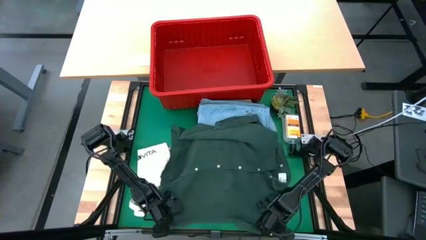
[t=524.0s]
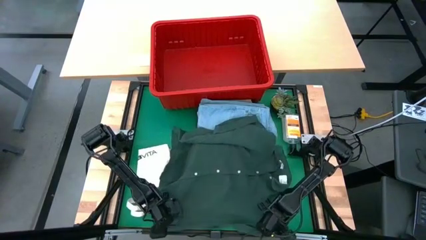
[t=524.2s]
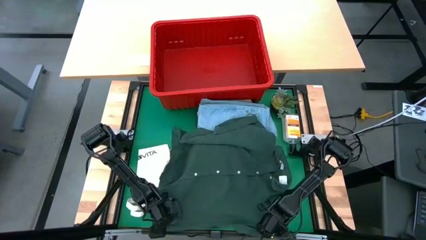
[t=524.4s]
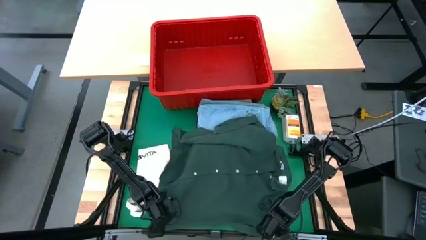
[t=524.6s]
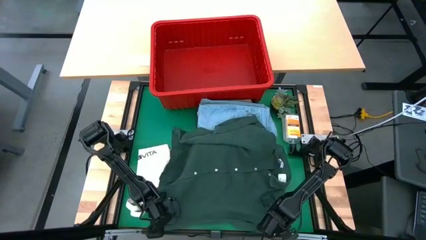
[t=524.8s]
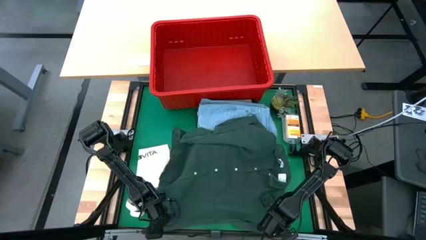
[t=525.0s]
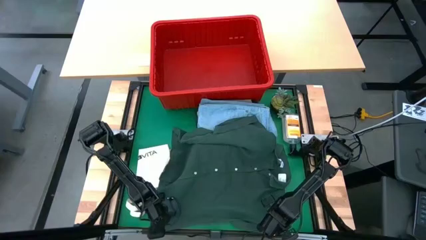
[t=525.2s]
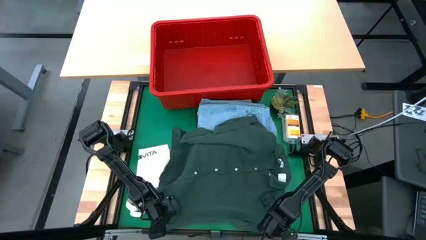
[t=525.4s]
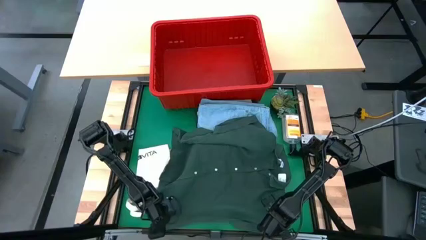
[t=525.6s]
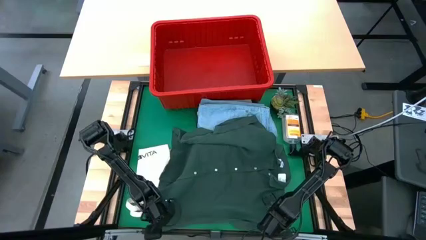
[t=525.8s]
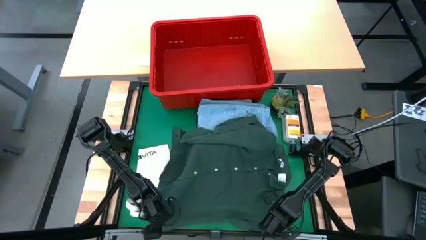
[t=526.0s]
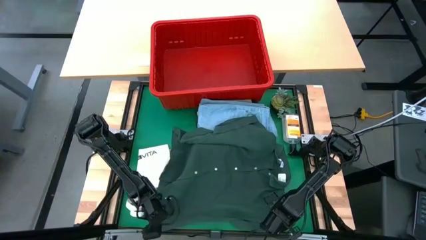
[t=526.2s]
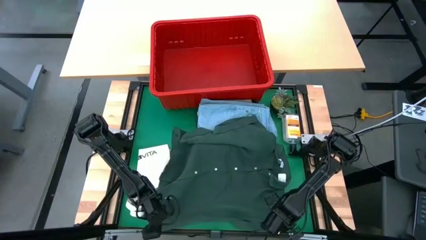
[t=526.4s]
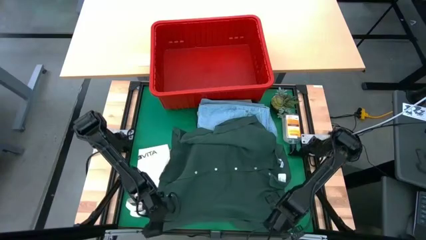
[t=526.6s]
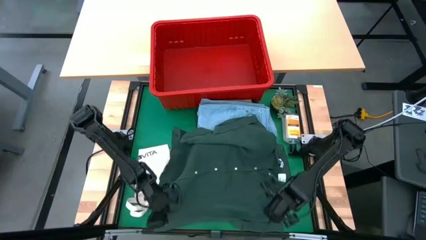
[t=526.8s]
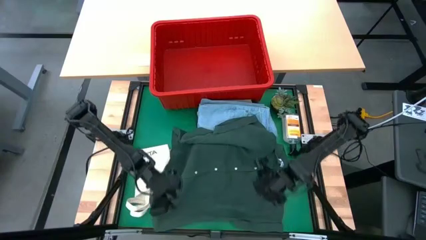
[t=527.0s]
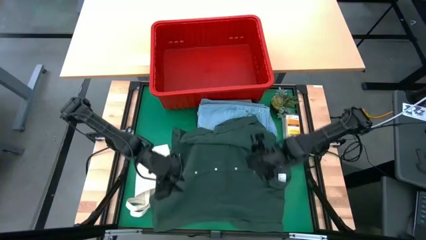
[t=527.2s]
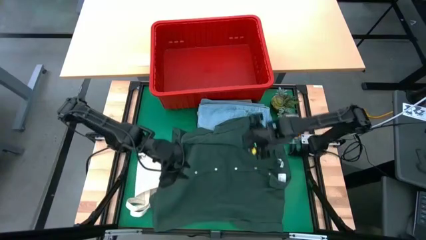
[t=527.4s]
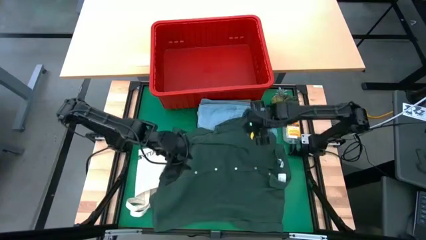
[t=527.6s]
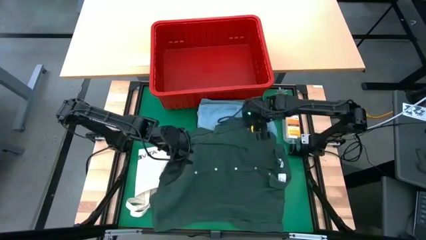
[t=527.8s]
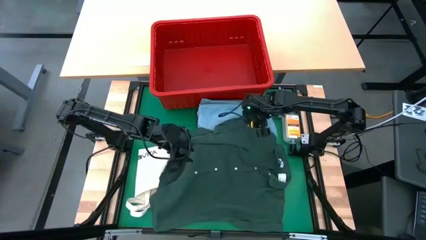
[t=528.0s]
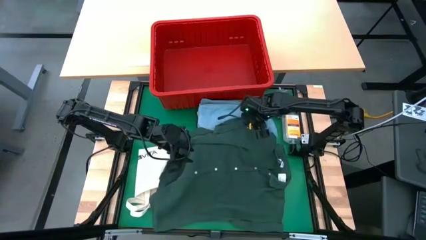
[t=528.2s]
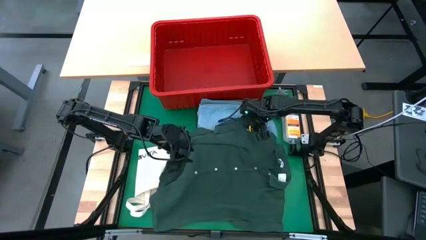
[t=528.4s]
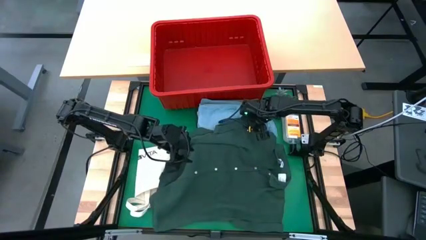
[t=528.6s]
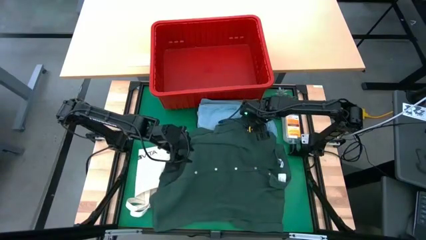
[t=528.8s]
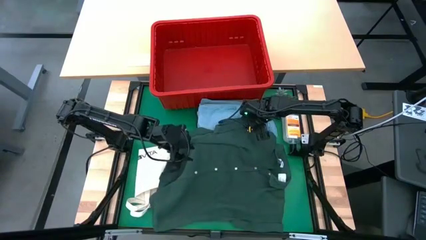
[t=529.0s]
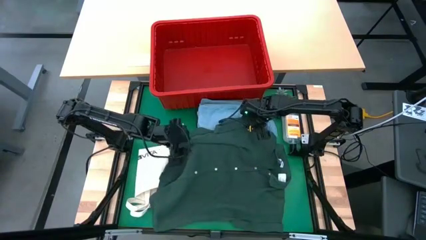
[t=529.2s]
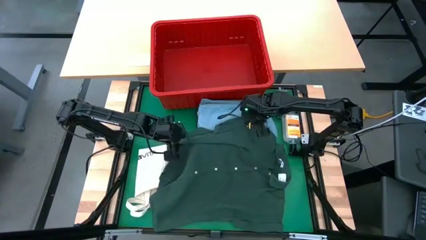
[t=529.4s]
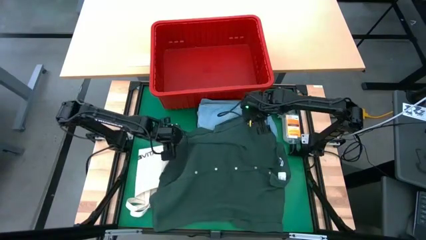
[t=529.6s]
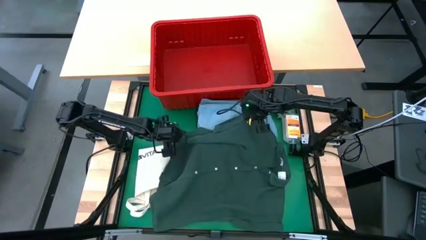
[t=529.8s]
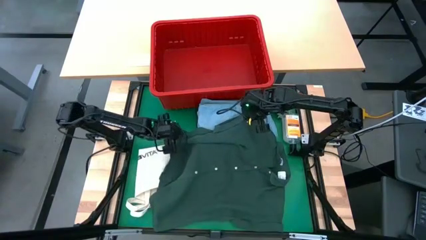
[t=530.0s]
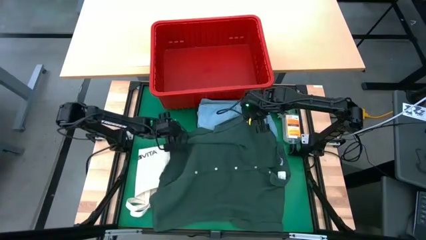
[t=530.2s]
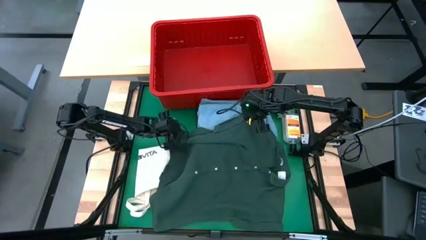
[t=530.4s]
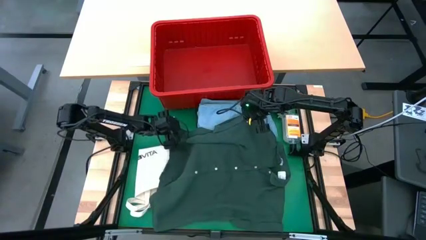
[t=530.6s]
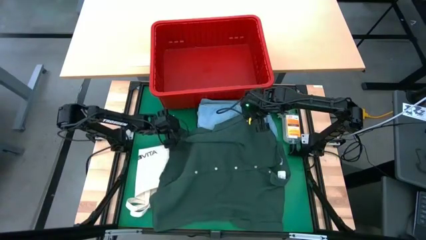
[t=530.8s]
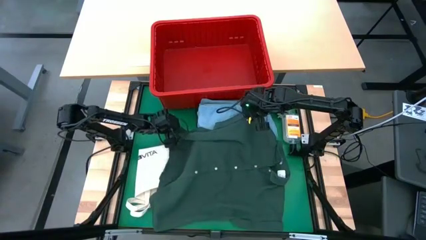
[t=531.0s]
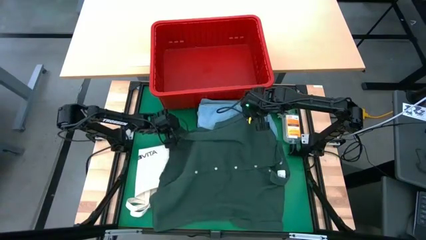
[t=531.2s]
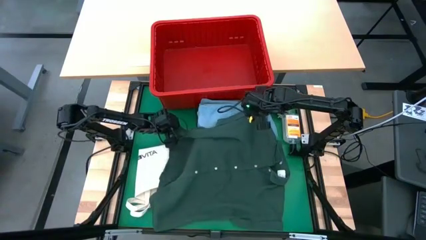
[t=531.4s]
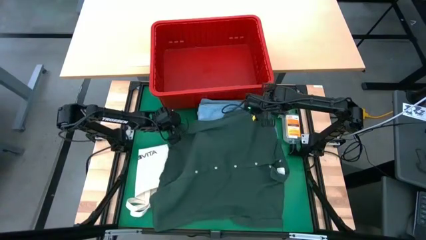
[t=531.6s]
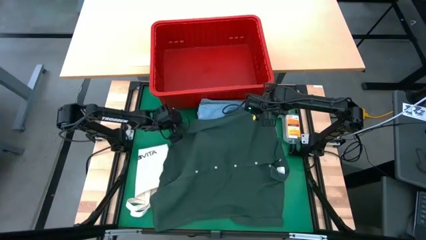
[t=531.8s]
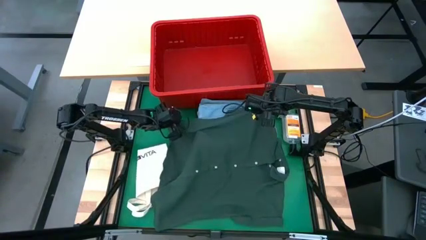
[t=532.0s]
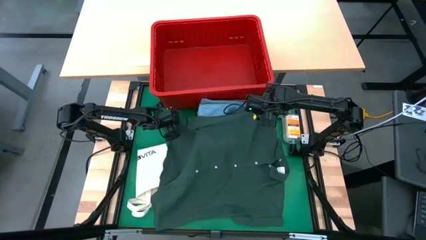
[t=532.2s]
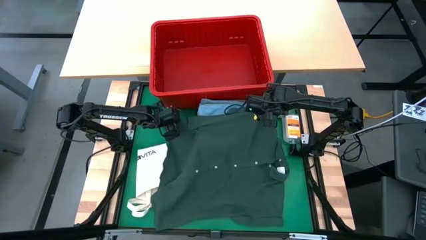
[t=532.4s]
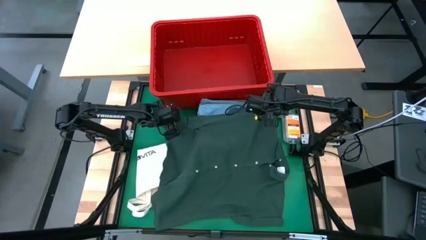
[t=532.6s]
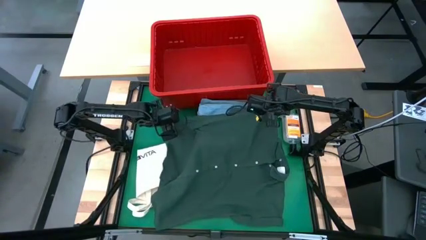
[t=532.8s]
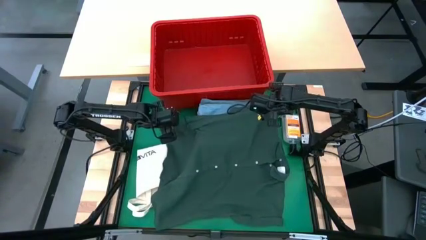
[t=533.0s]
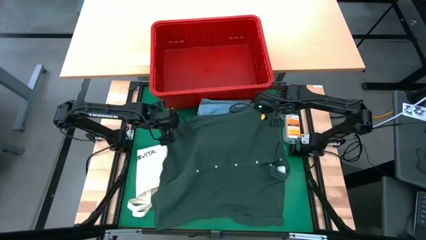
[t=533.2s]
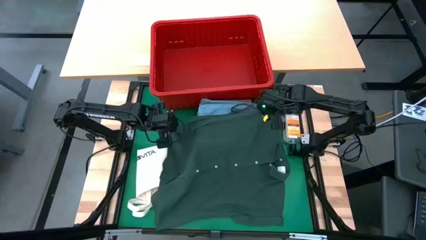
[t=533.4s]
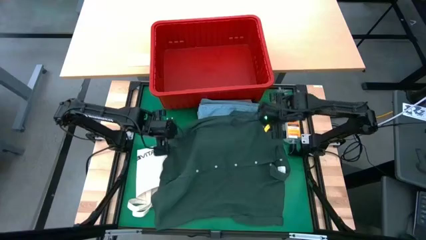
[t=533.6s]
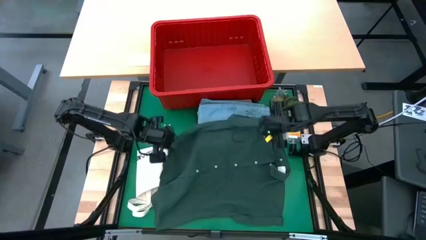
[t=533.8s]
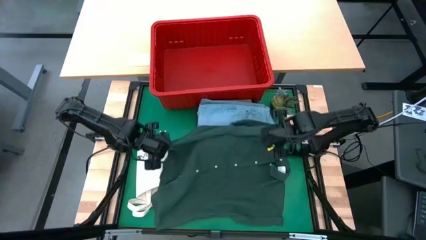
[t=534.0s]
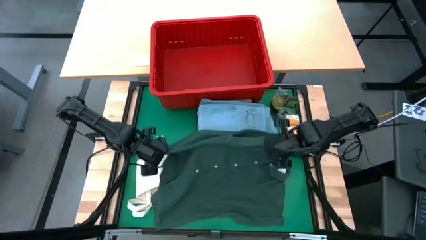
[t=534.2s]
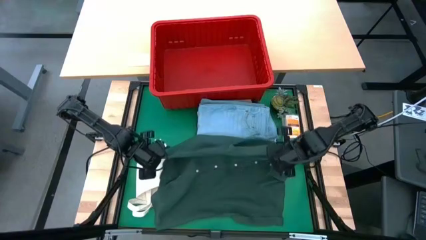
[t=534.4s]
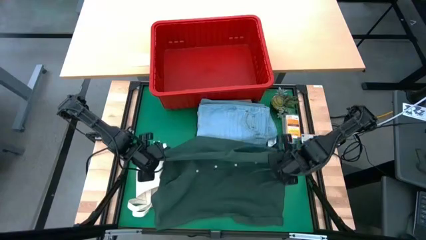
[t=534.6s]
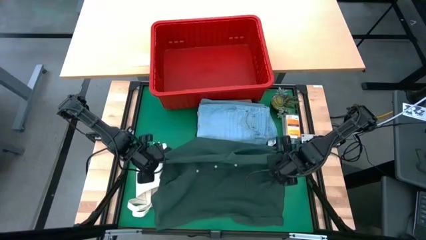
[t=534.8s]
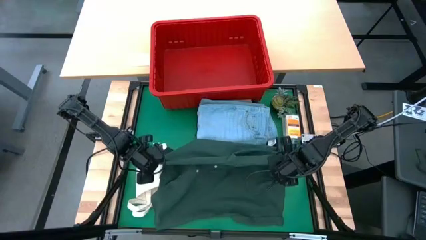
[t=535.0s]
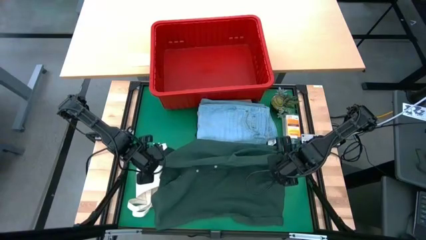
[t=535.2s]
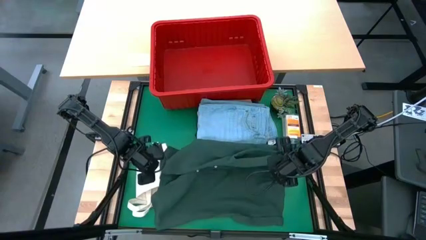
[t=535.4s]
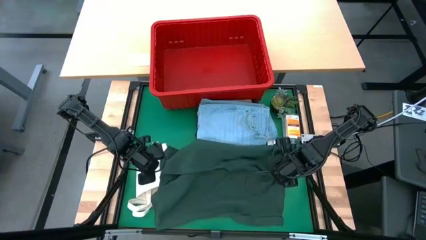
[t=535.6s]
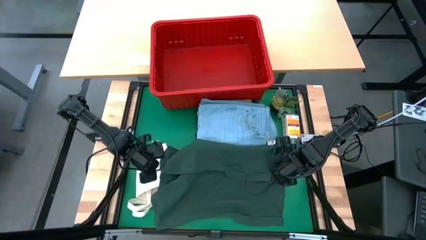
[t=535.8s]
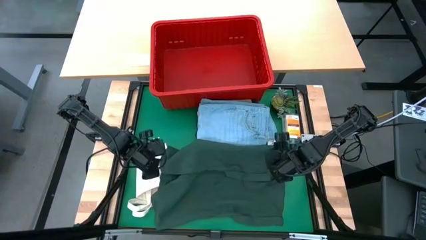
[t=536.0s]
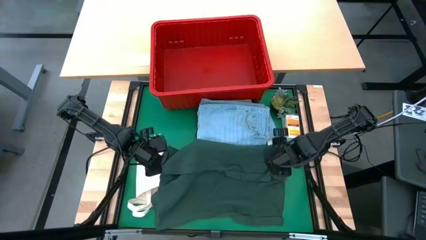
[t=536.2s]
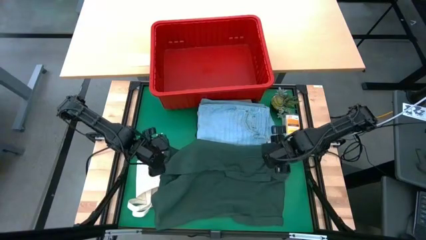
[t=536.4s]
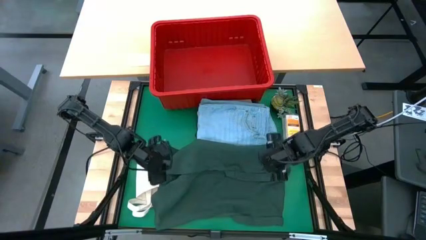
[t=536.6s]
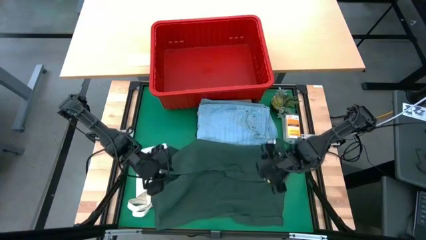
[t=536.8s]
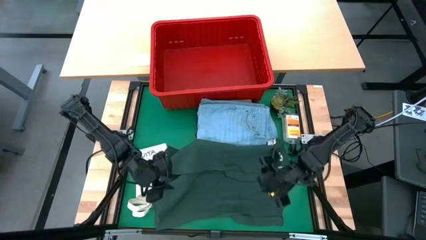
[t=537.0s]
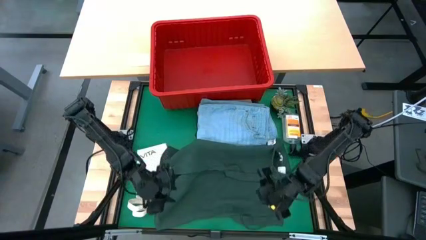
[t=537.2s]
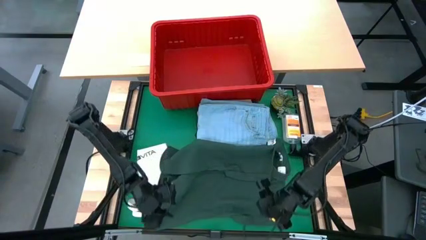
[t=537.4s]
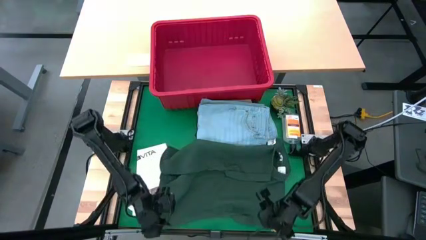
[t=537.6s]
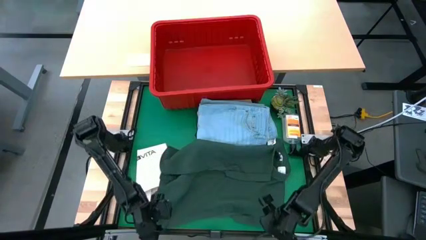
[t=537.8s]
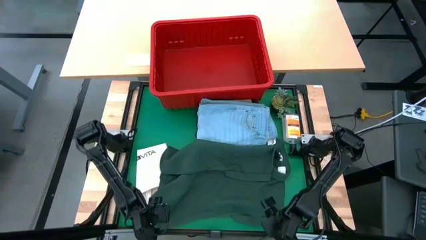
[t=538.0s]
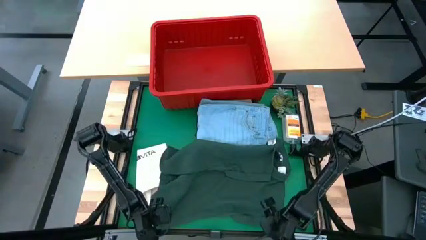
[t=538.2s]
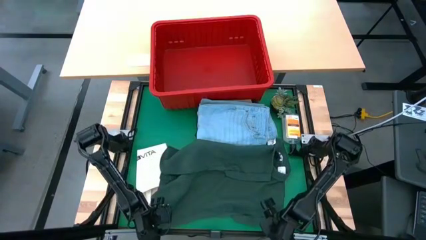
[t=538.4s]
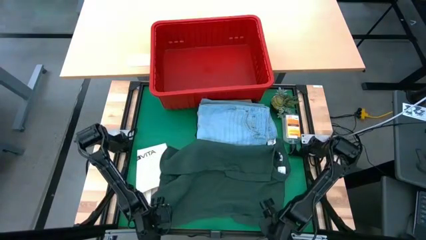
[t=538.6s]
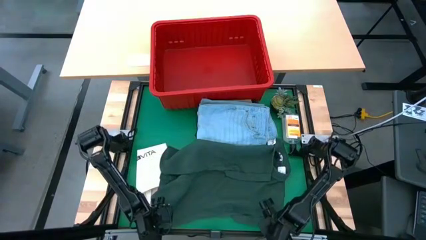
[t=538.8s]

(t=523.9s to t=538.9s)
Task: Fold laundry
Fold the green polo shirt

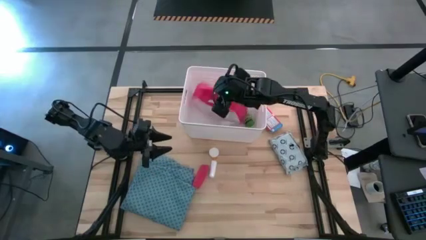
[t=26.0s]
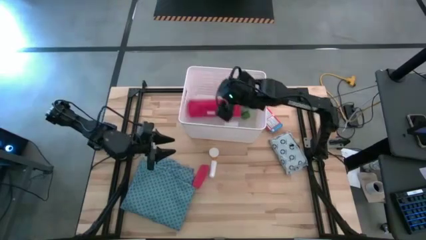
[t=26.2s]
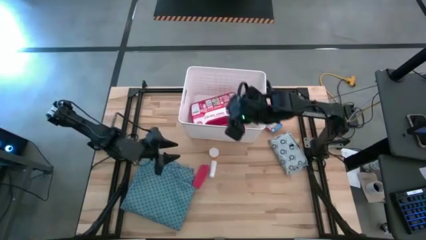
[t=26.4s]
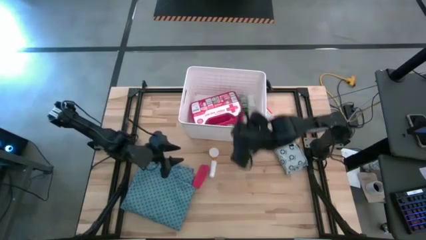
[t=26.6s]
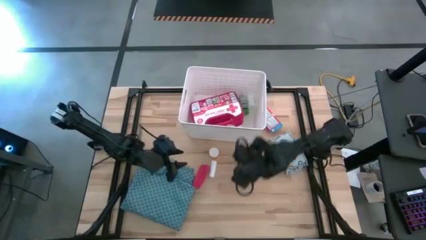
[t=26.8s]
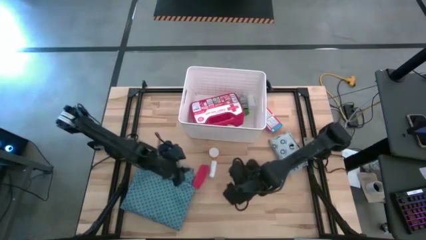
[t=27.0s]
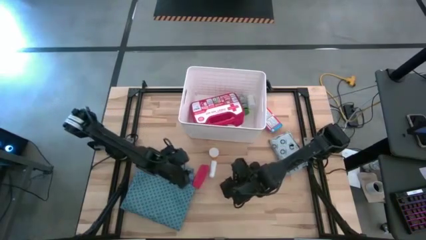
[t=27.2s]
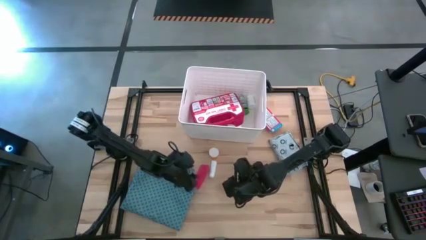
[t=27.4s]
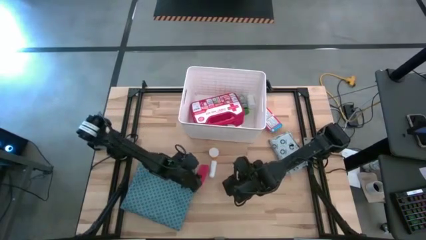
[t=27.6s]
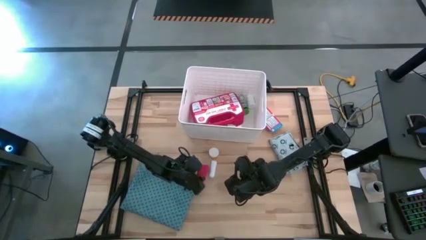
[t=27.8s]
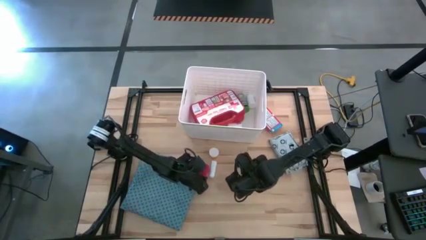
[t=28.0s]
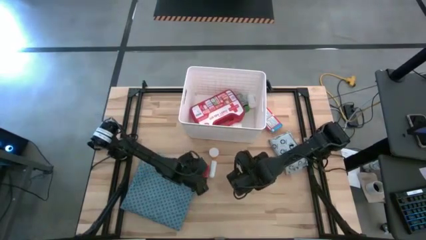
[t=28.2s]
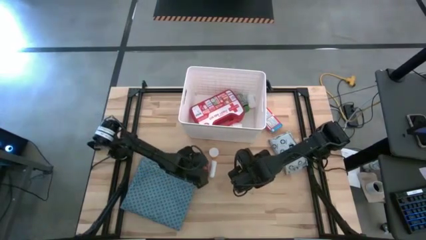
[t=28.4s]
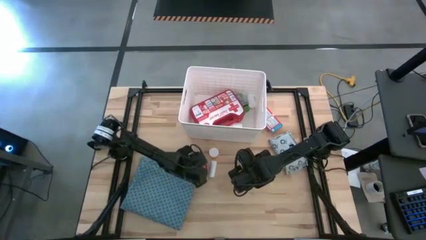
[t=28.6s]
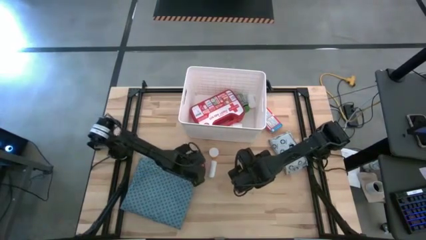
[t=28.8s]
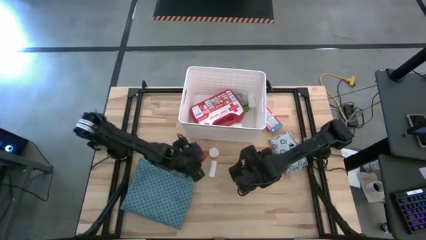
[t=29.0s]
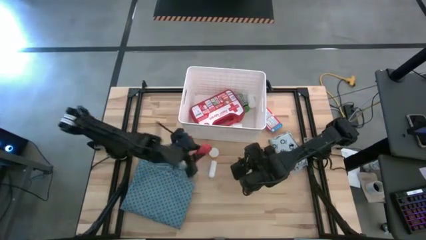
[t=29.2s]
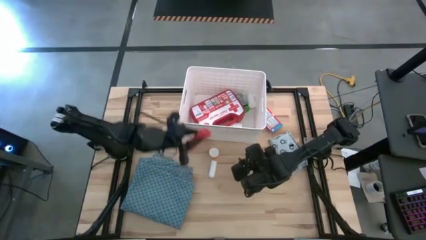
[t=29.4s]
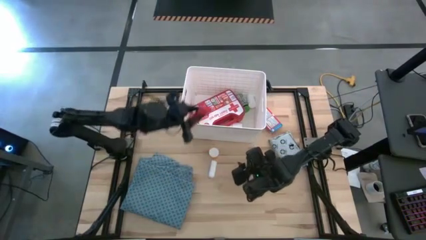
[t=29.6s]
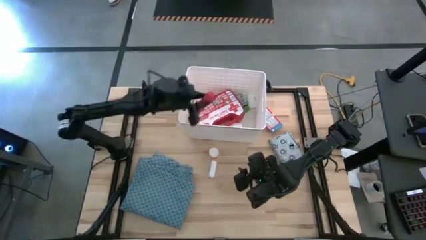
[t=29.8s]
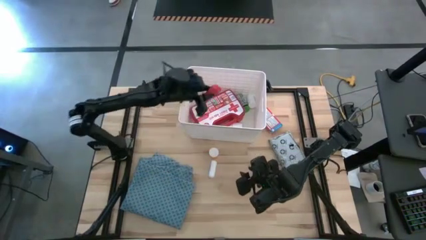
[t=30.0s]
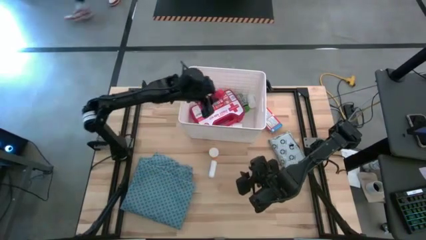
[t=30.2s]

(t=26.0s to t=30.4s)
Task: Pick & place medical supplies in basket/bin
Put the red bandage into the white bin
